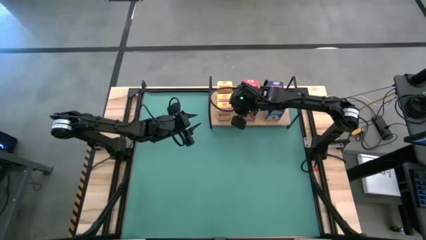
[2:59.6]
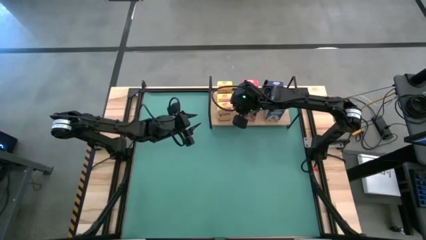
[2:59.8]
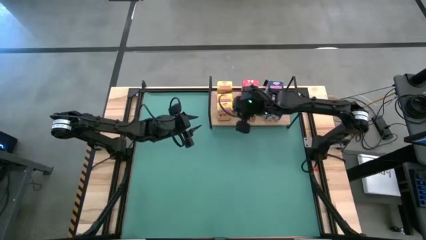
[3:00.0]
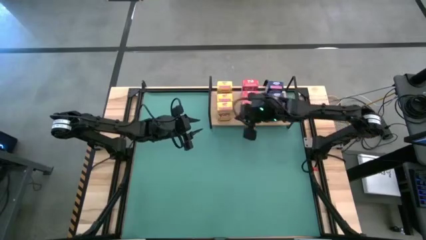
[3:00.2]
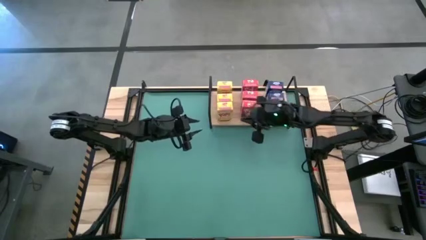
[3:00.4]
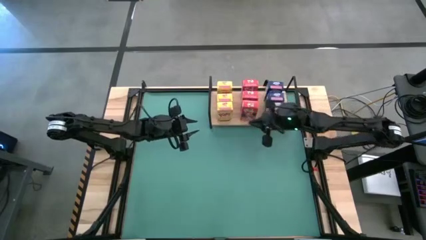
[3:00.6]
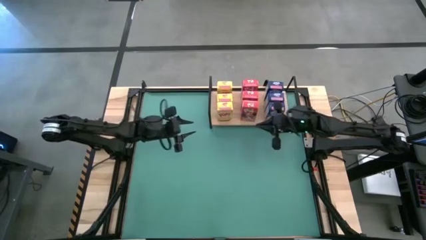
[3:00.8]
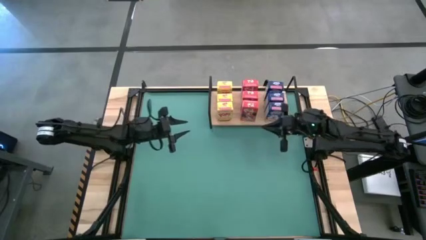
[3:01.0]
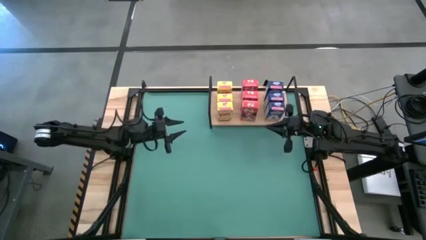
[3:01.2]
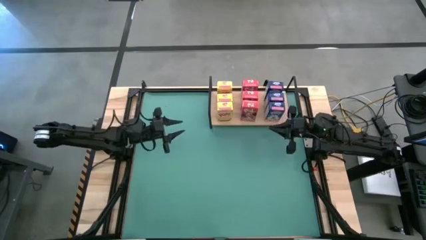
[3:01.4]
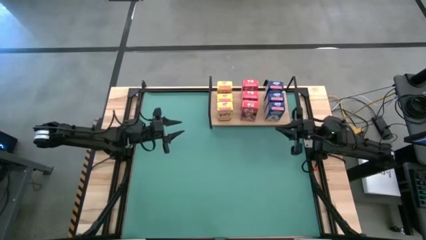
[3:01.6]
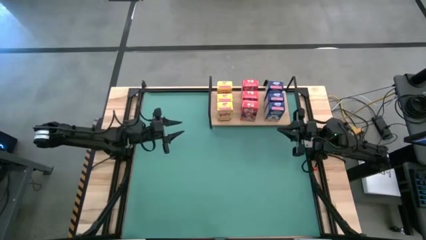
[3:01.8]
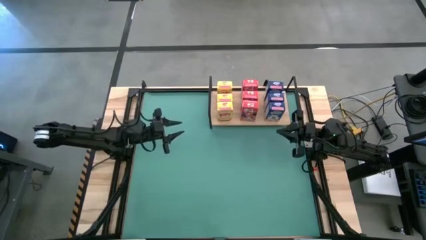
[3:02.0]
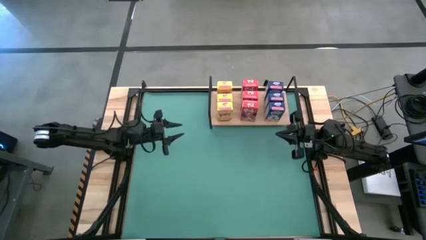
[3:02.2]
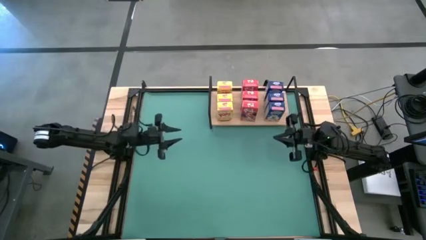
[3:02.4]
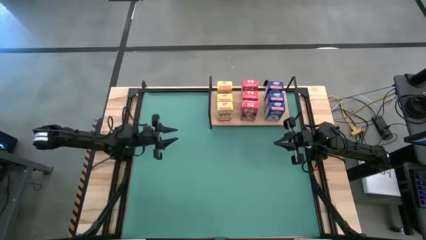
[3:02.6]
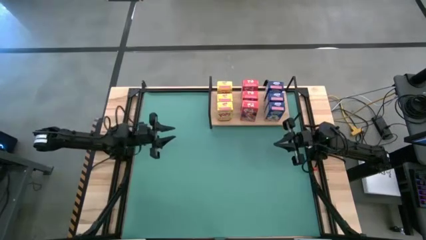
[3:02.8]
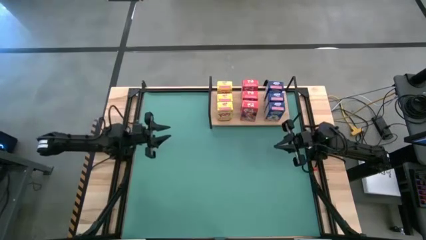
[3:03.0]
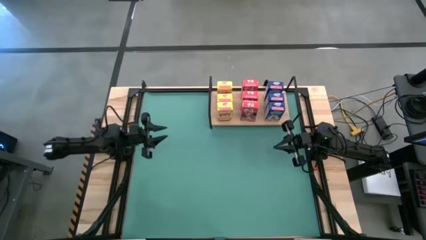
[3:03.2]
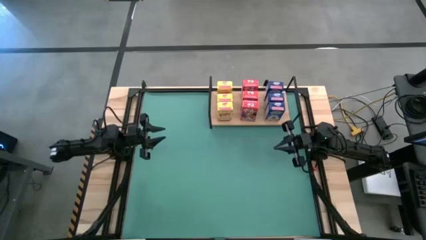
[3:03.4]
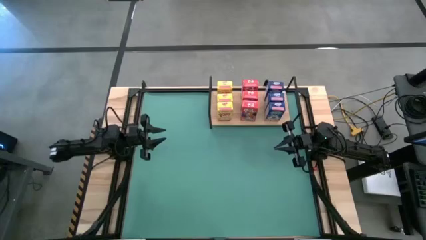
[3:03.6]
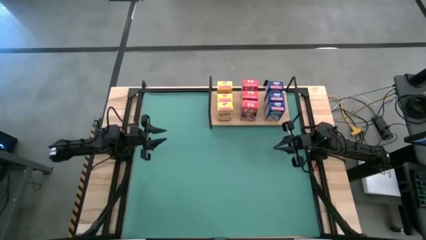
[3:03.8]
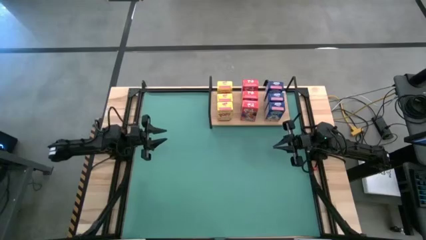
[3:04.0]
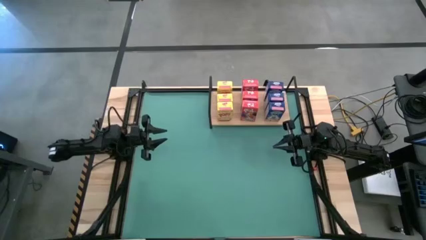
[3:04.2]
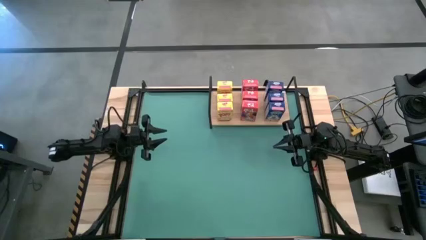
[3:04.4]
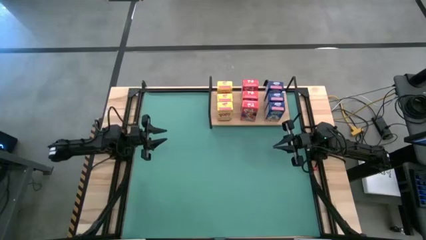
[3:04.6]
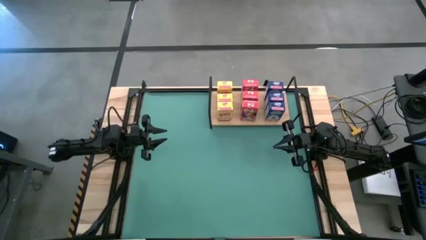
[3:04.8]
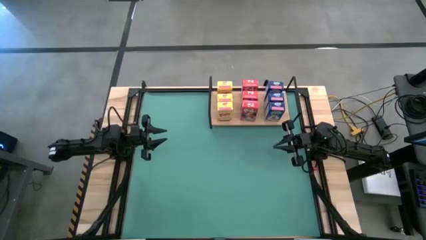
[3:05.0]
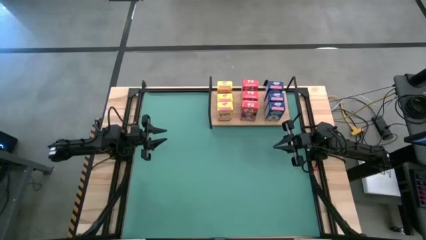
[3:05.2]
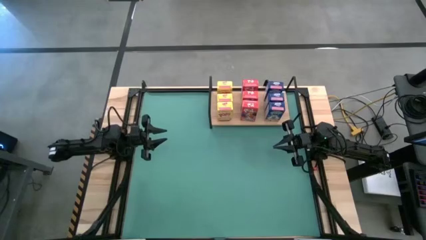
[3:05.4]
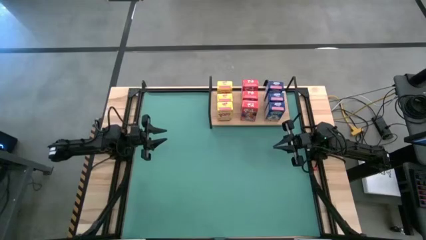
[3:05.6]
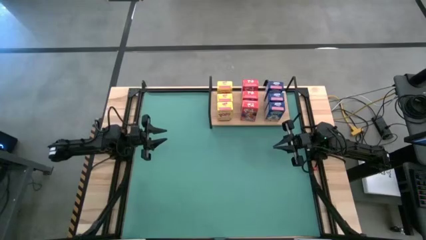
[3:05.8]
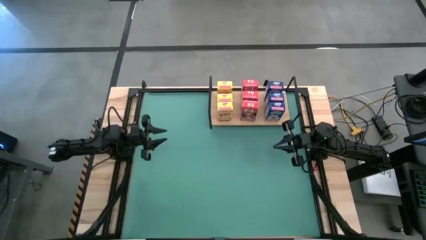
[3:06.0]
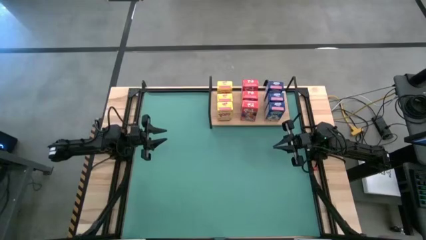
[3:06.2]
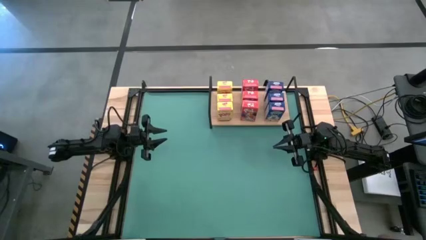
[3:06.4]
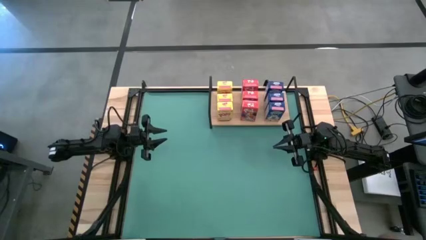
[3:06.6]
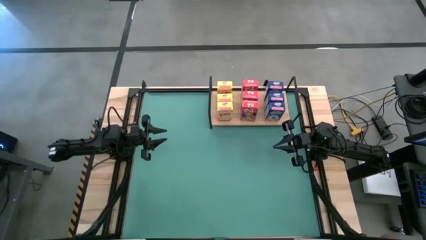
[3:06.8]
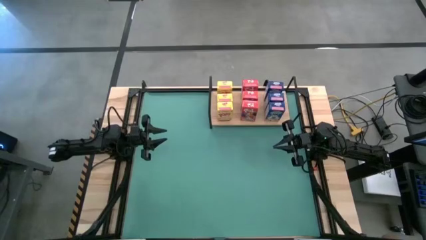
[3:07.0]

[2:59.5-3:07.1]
Task: Stack cereal on shelf
Return to Home Position

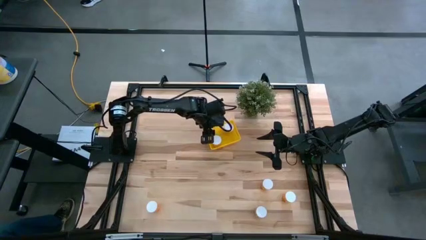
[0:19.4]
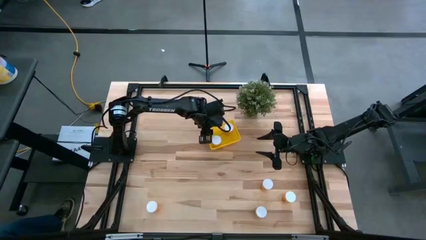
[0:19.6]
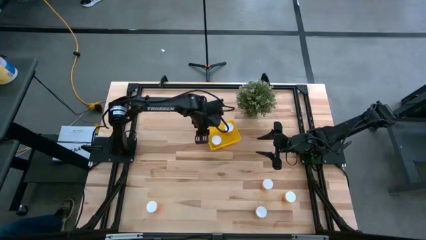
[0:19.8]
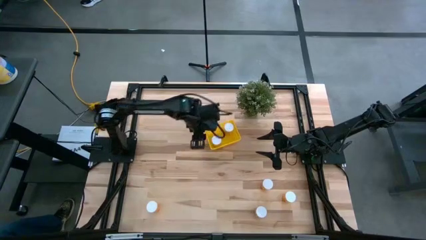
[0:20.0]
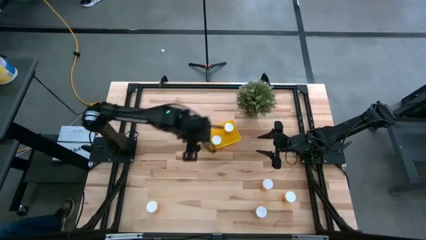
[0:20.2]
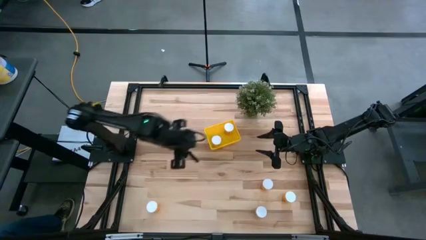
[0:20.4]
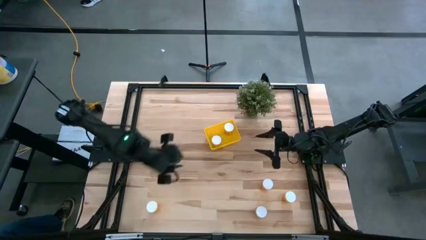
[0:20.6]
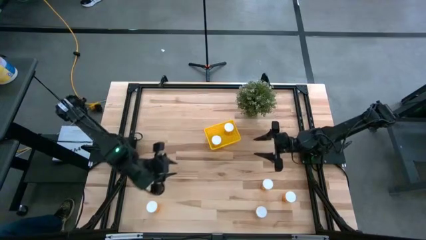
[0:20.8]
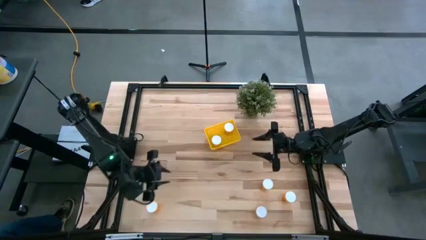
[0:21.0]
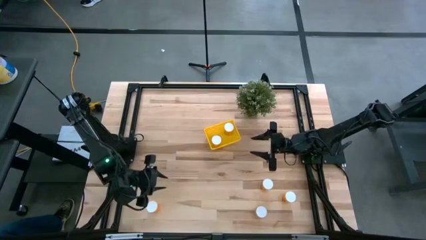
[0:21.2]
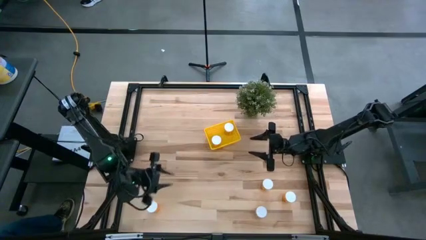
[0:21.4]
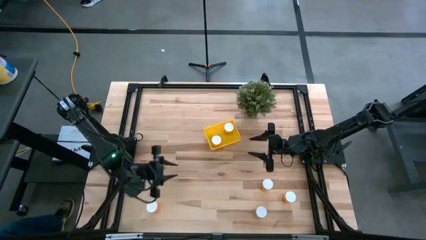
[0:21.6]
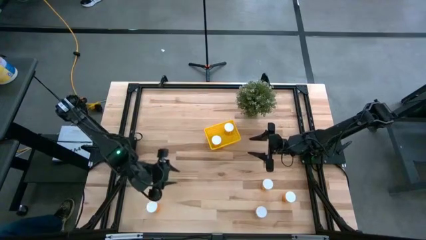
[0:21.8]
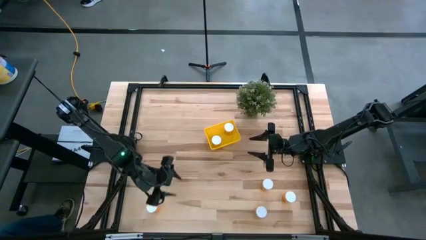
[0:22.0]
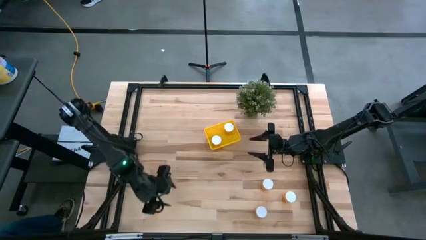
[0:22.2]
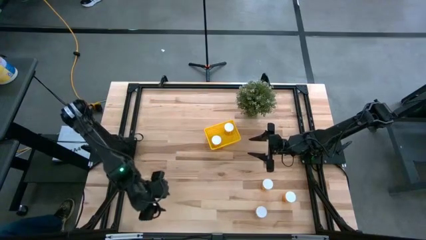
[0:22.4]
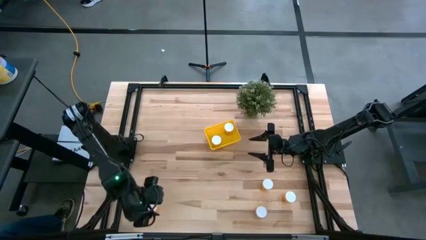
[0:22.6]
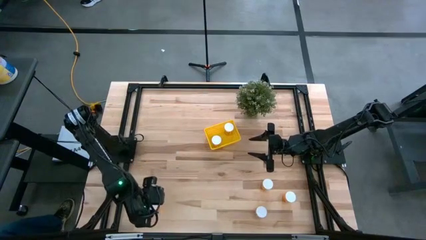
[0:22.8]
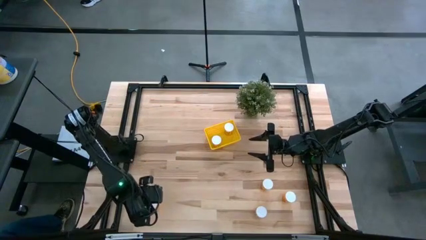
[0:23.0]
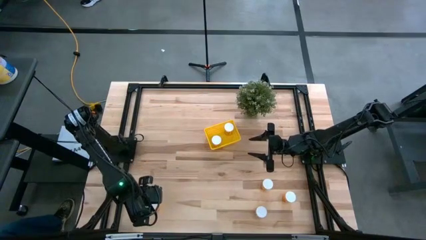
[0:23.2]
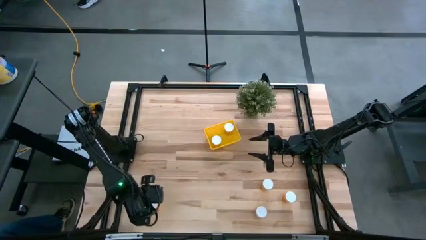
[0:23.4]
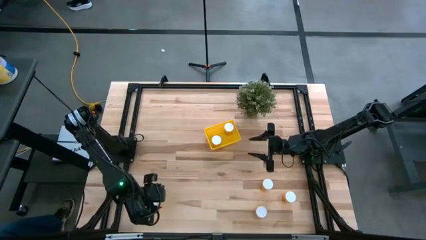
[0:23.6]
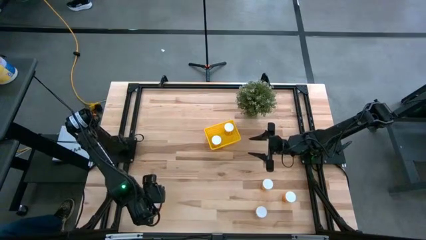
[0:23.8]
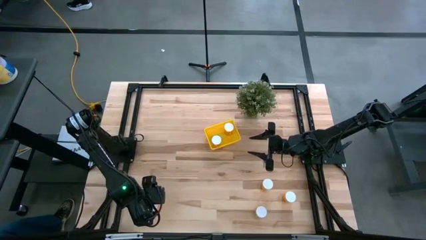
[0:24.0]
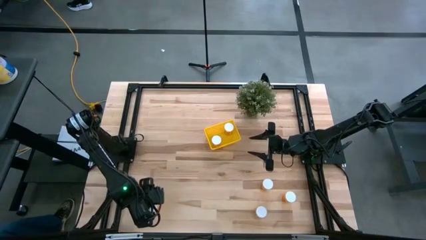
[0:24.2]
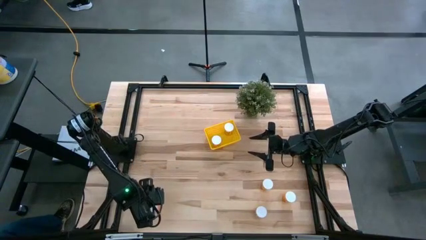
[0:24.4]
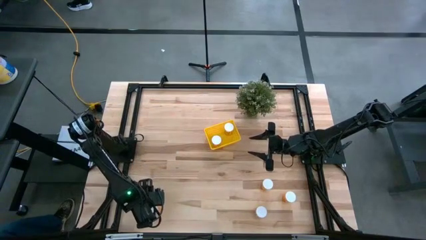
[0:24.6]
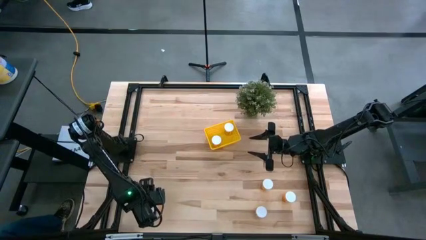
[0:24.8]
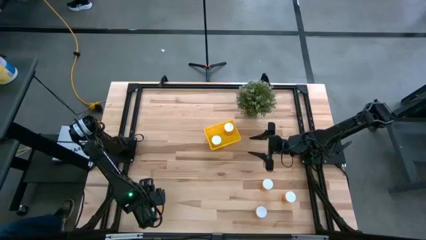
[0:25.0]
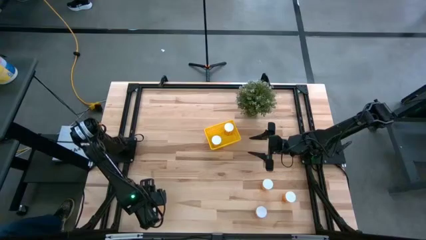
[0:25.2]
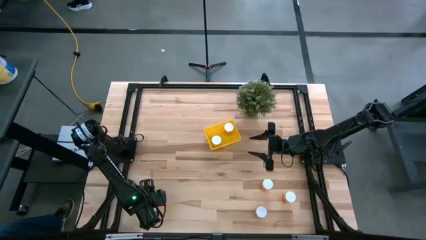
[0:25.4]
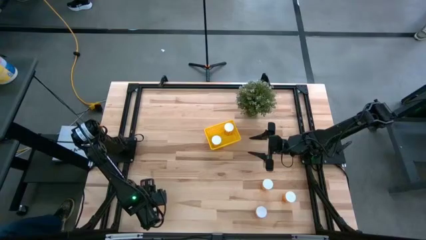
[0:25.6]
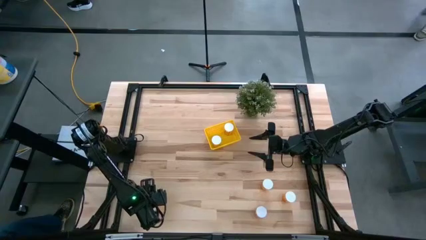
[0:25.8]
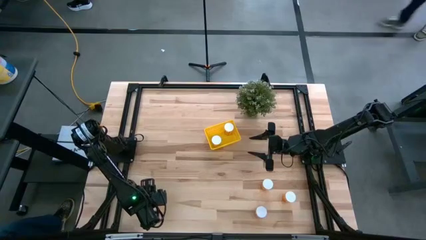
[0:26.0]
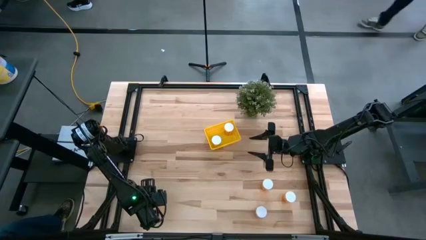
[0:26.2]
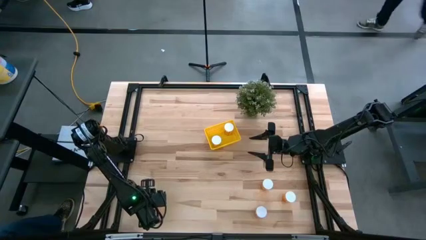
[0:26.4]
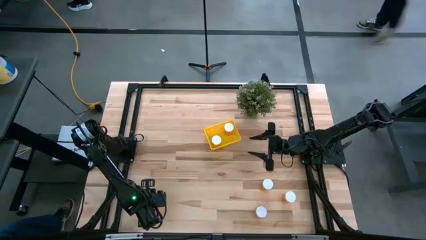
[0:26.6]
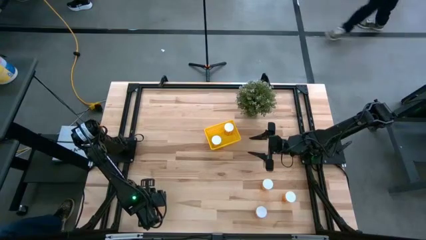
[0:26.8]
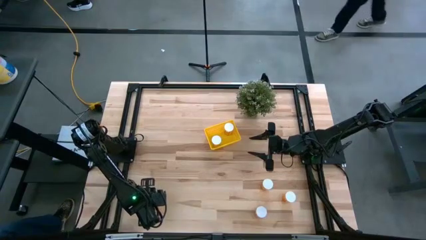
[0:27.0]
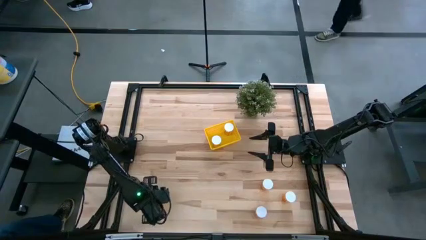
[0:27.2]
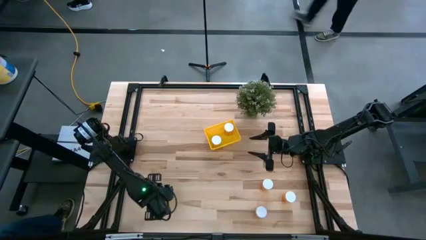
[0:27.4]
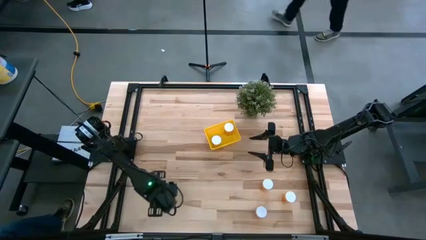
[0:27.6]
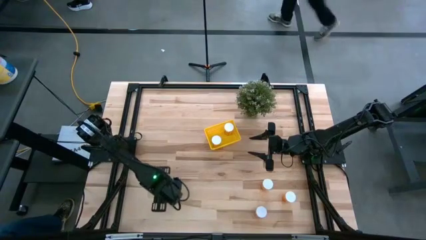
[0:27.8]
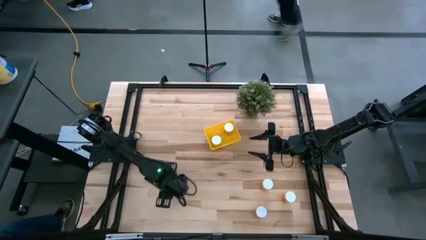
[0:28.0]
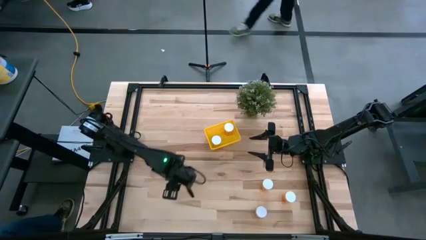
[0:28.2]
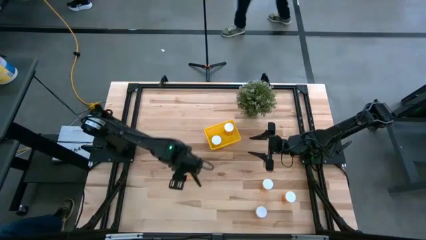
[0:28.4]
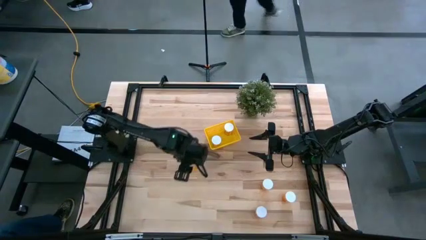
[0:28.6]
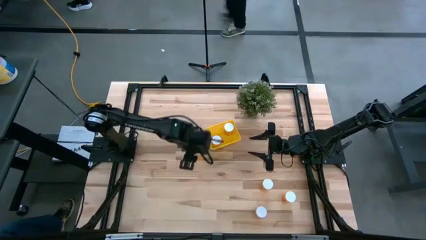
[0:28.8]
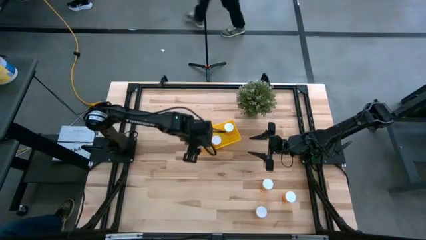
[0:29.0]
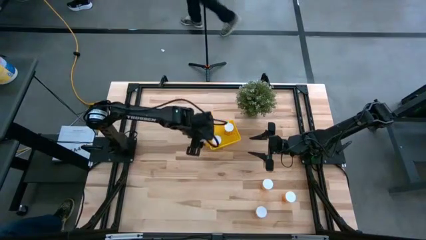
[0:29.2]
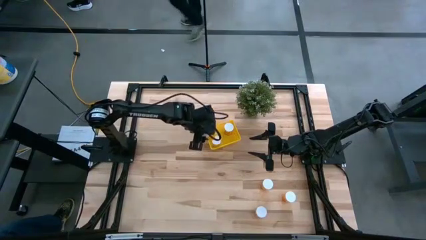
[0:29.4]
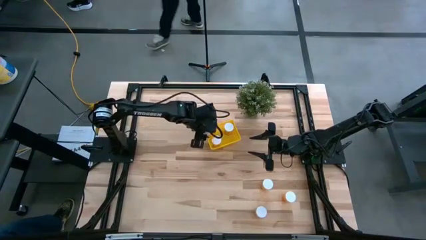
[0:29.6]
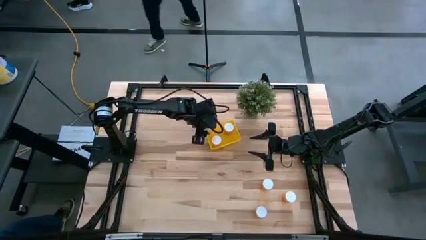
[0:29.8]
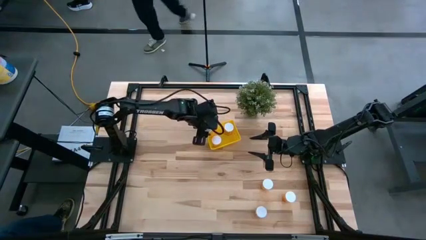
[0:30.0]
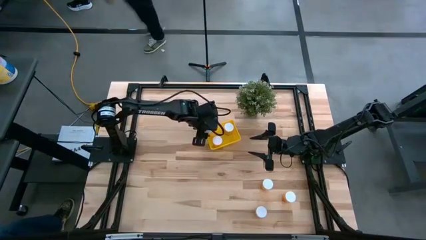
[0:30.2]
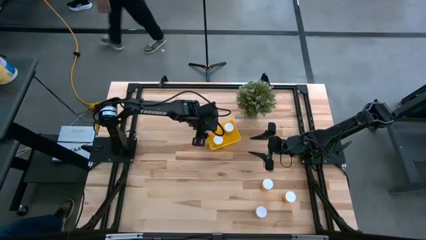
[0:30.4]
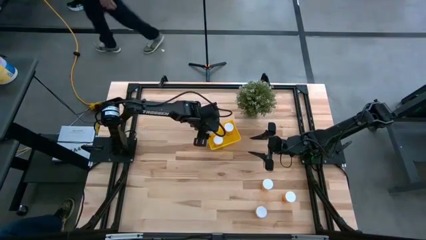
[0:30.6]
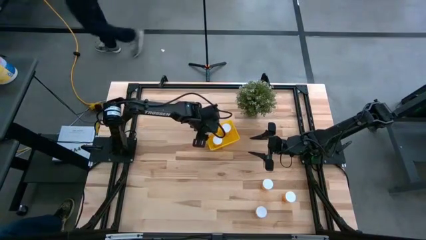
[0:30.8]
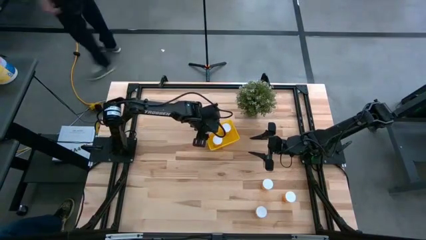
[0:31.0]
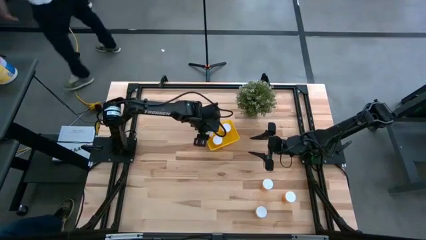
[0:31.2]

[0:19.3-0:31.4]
Task: Pick and place pill bottles into a basket
Put the orange pill bottle into the yellow bin
